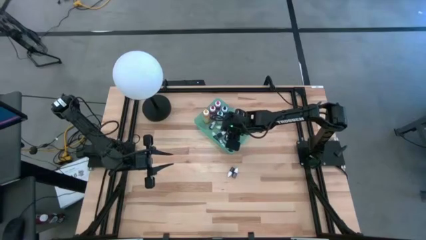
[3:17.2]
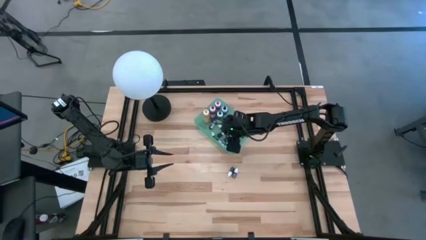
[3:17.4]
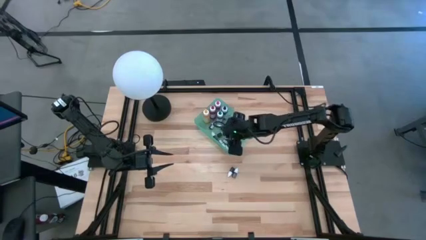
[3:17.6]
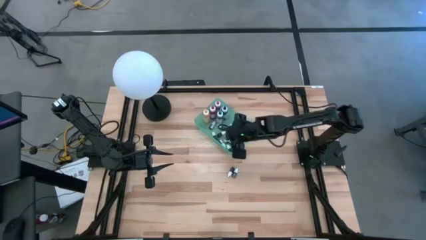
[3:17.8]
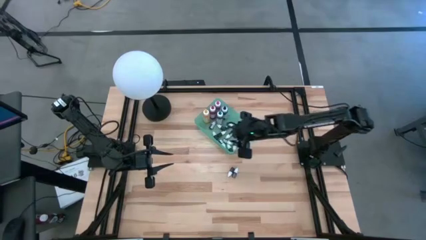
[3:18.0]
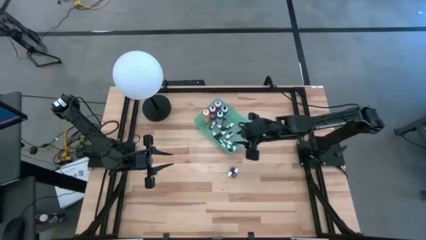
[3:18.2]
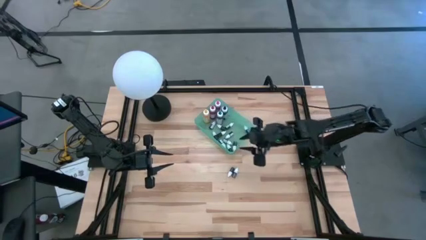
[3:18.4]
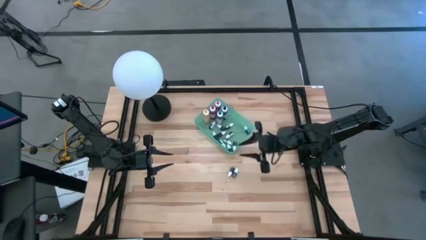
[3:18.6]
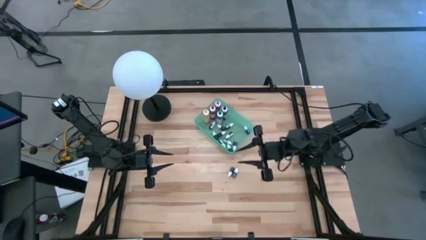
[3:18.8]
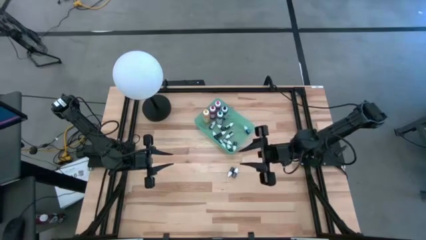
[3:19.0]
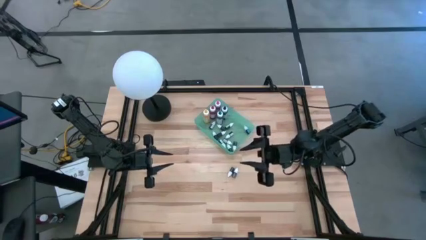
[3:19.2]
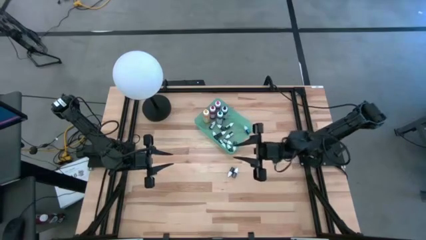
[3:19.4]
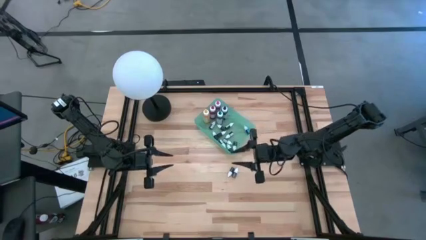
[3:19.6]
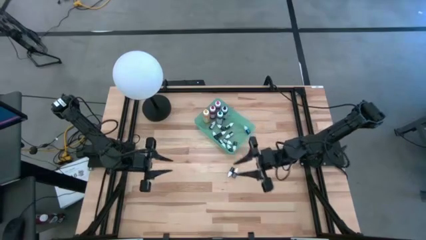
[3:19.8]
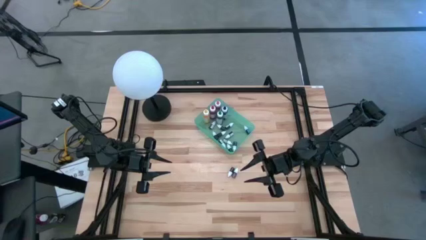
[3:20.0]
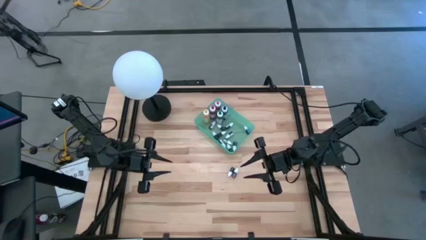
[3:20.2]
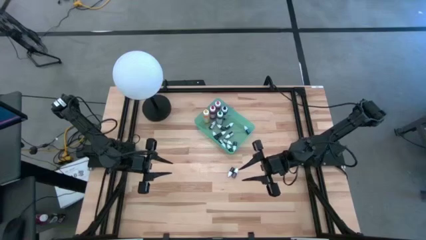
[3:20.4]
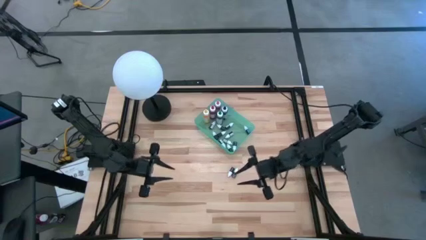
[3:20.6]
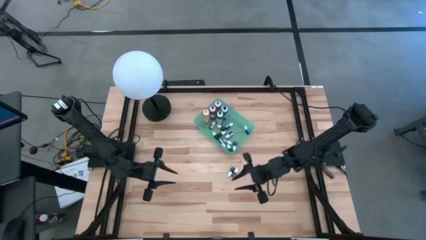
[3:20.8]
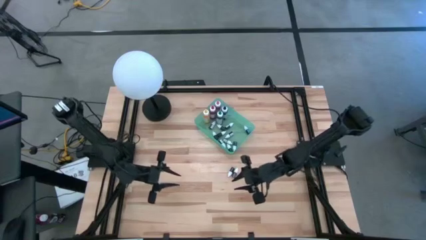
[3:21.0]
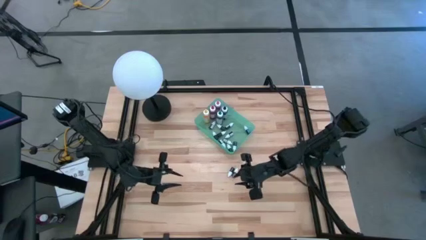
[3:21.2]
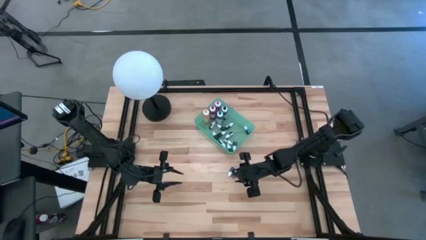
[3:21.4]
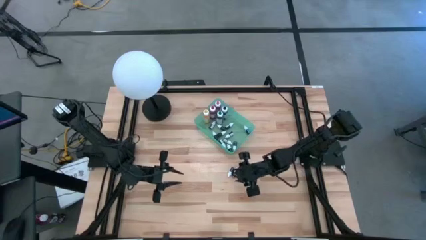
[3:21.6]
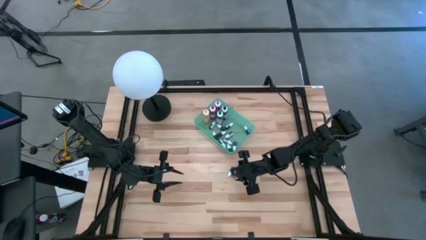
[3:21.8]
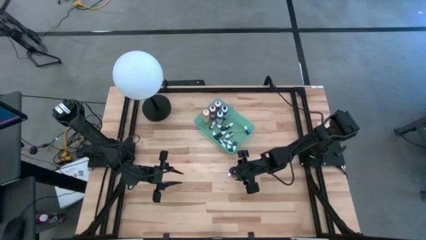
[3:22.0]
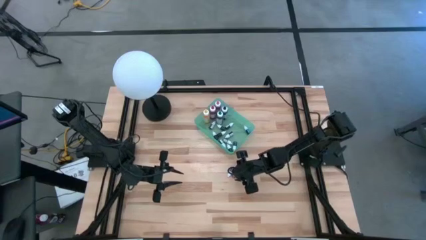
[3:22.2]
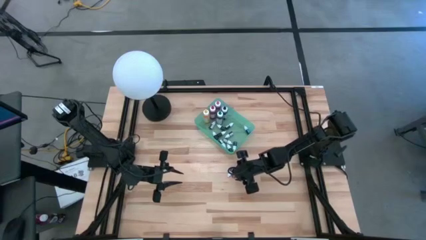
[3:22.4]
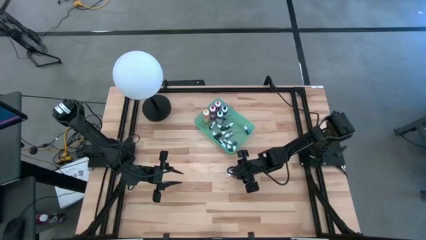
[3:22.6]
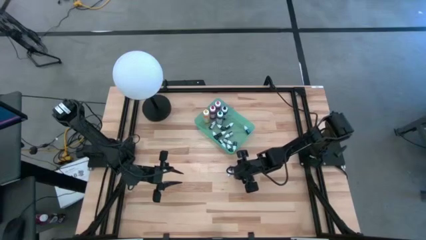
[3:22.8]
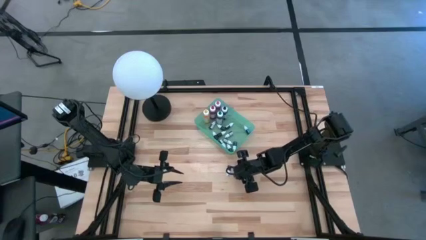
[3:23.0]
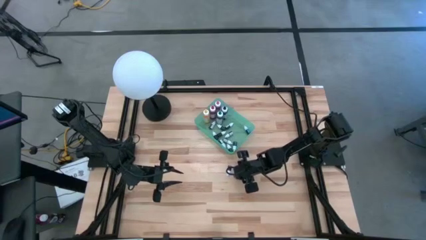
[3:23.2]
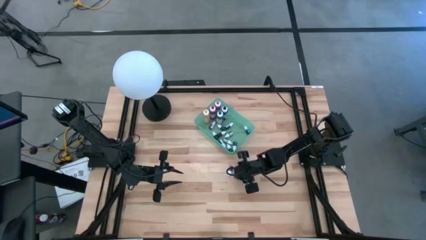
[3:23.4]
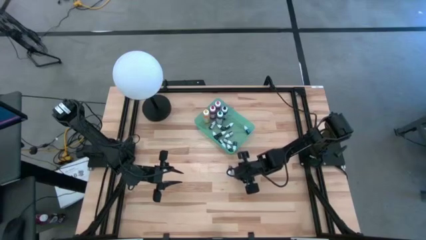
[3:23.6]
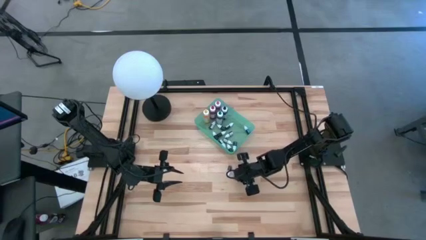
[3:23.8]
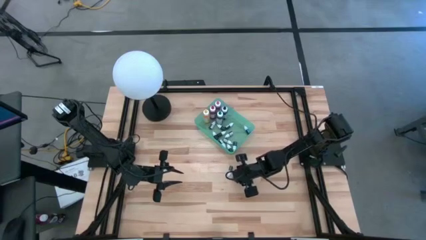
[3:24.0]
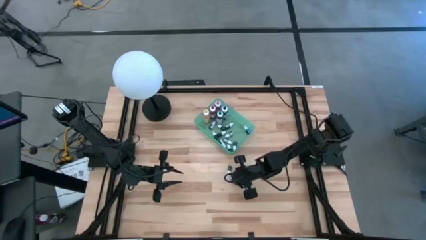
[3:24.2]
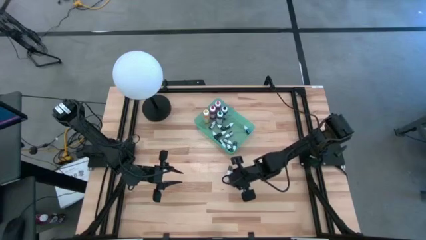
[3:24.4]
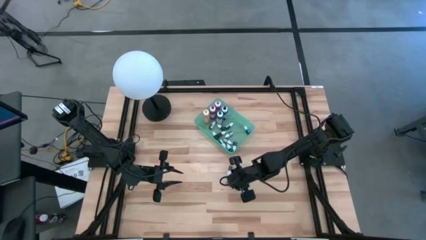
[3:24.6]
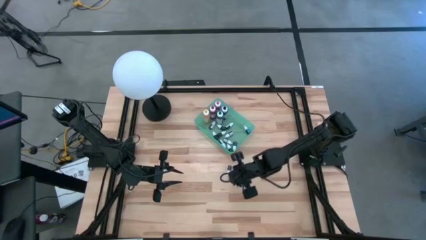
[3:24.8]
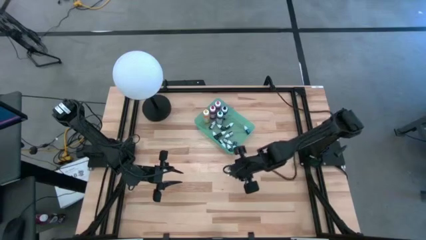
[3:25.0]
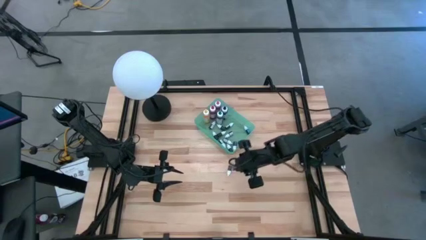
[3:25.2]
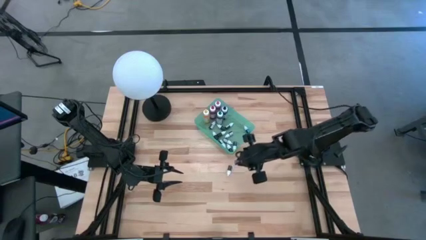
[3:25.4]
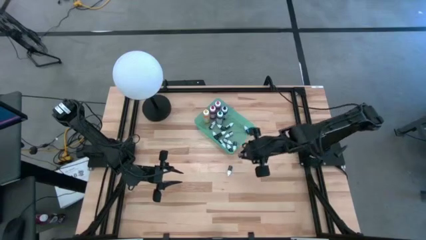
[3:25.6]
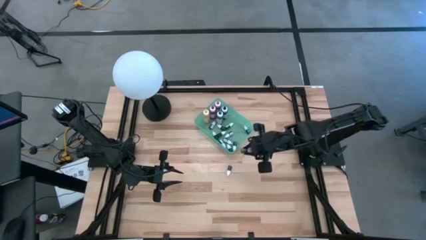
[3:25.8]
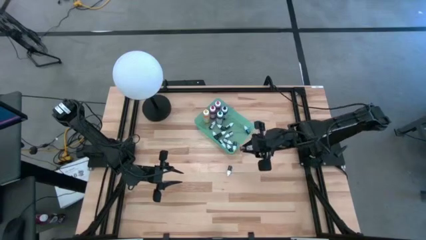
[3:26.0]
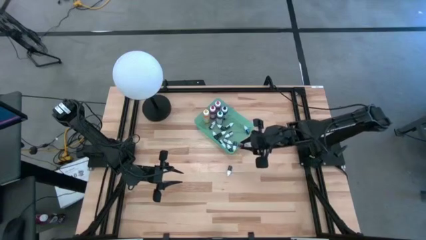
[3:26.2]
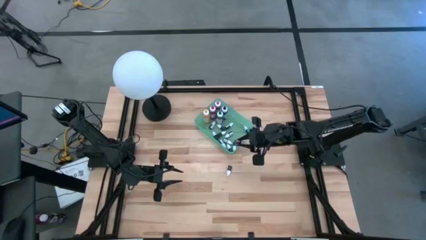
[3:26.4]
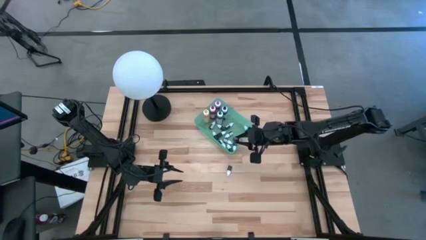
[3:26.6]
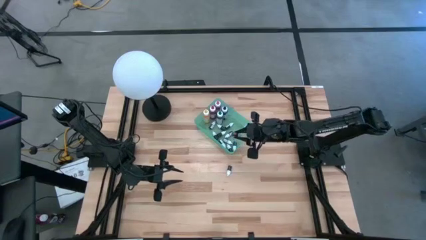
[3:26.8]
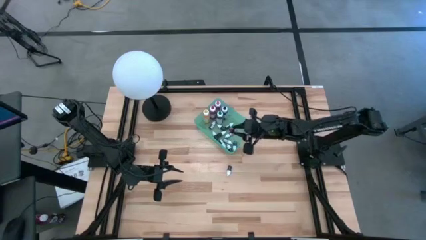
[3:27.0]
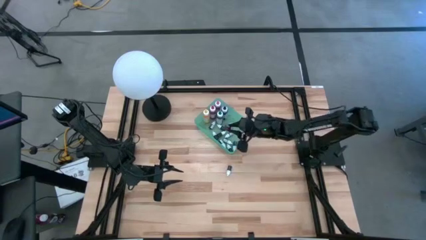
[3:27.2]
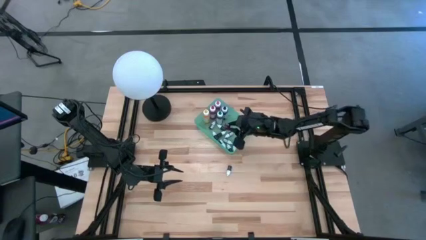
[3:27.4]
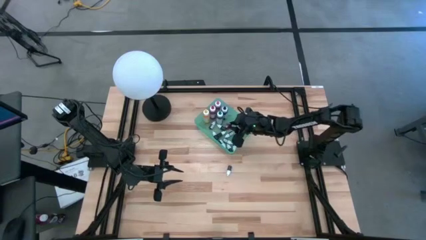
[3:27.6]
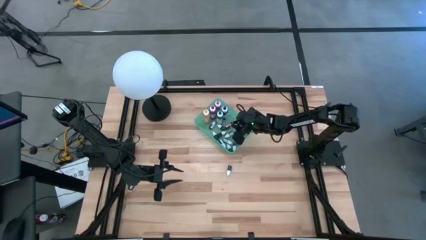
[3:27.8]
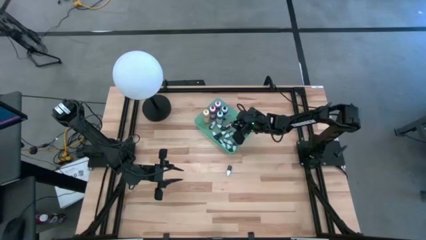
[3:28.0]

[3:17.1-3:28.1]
Task: Pick & Place food coloring
Put the small orange food coloring bottle into the green bin
